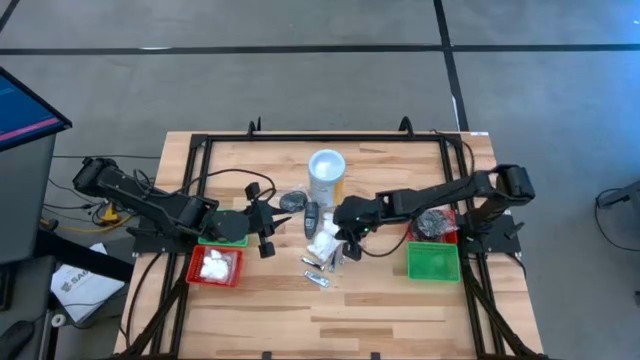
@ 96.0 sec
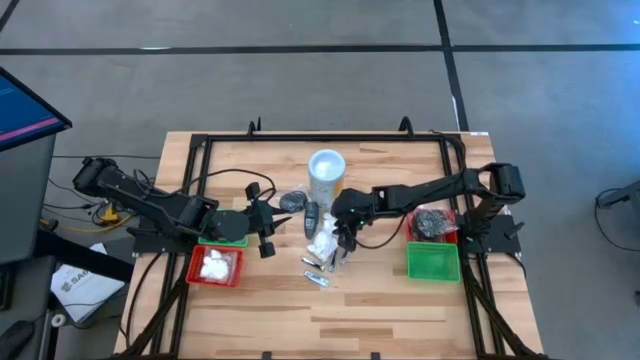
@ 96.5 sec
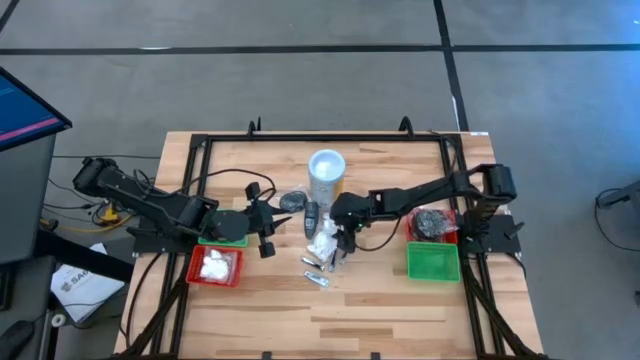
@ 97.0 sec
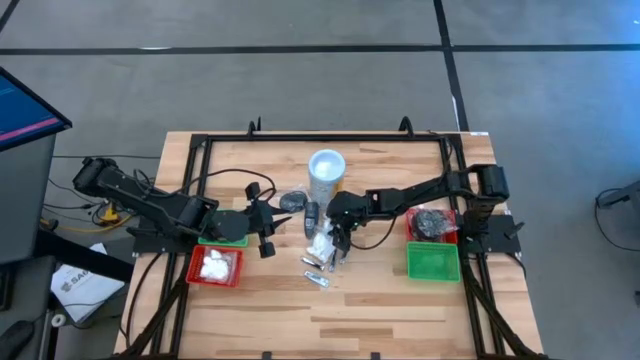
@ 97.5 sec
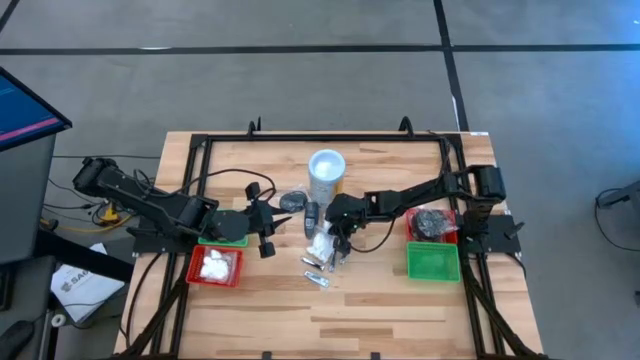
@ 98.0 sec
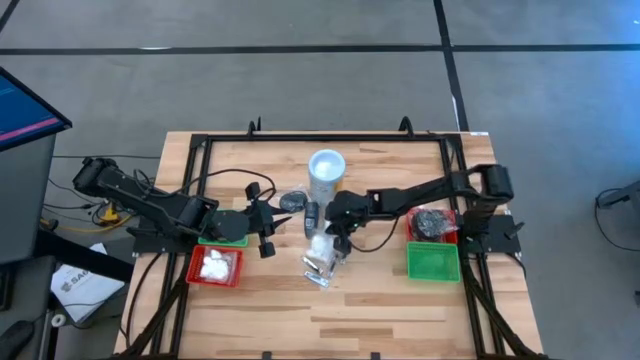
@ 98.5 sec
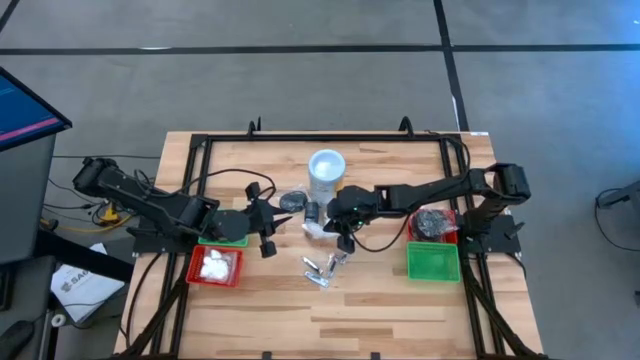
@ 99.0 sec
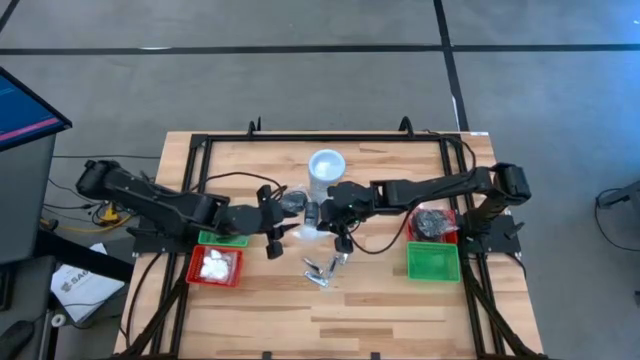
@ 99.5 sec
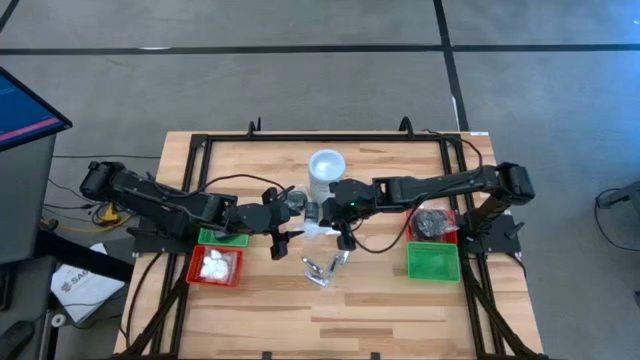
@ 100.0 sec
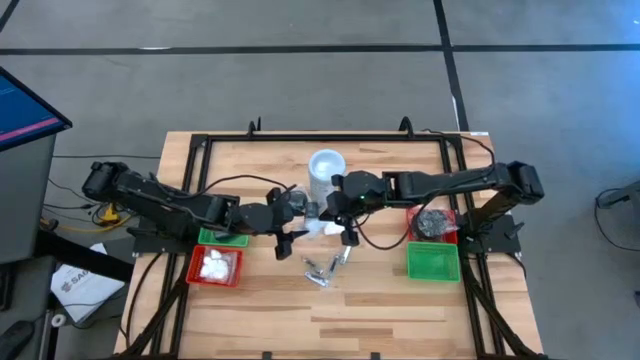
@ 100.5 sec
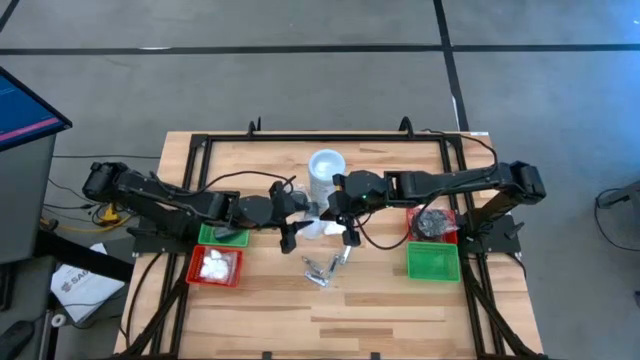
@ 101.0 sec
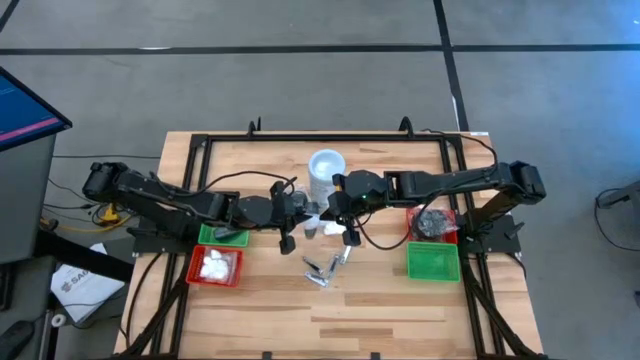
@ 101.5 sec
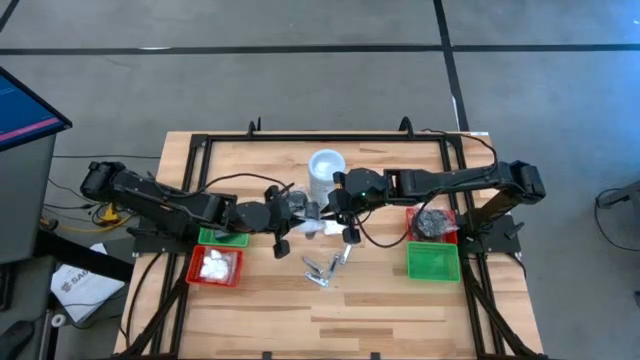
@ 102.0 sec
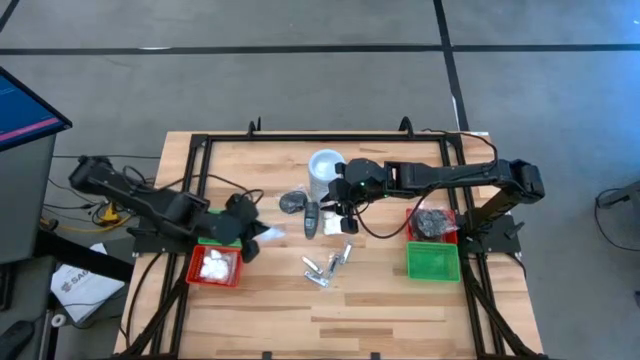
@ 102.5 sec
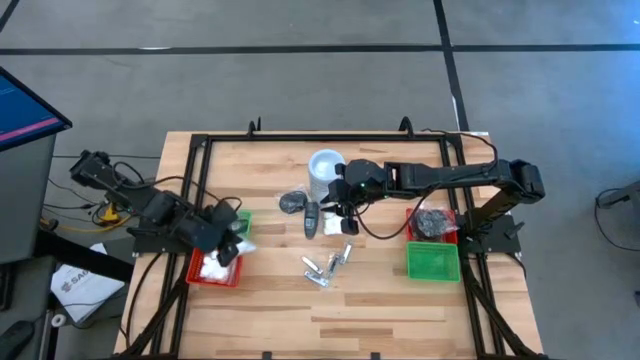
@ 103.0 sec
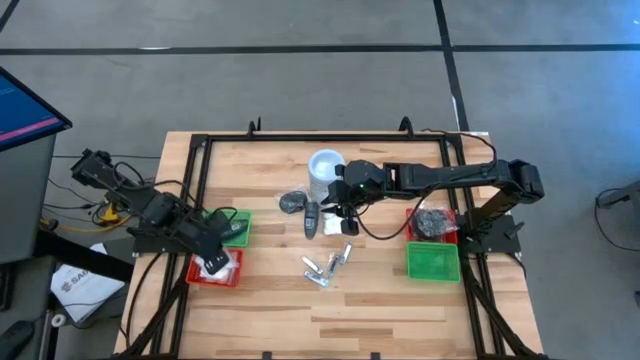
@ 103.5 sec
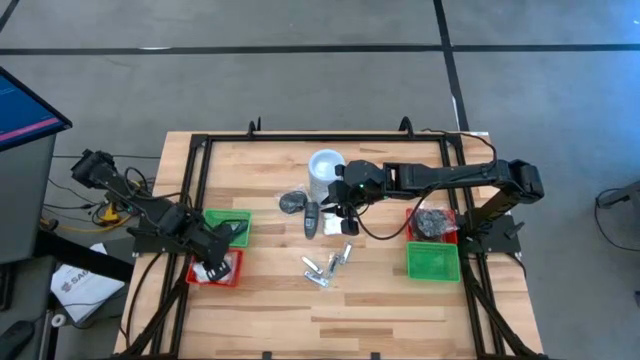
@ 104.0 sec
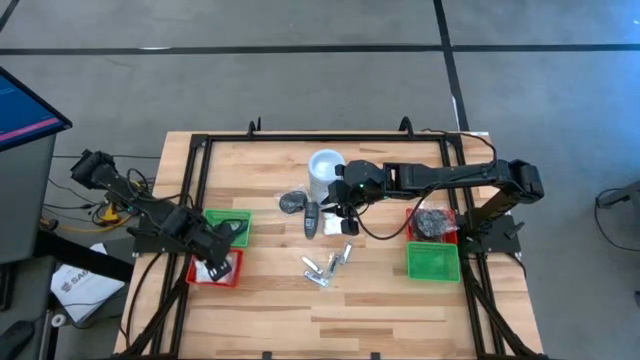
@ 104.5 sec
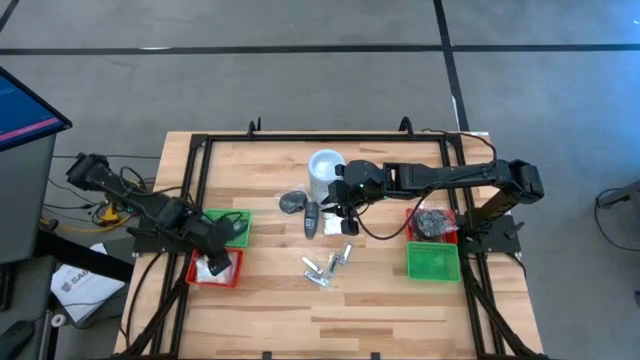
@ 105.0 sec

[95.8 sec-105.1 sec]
Task: Pick & Place Travel size toiletries
Put the cotton pack into the left red bin

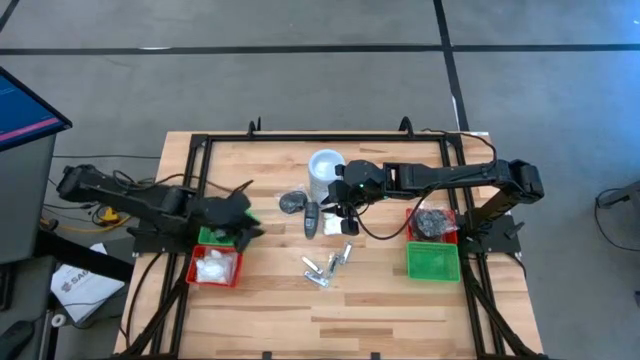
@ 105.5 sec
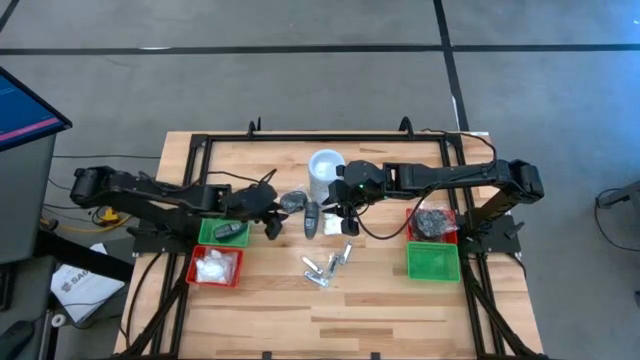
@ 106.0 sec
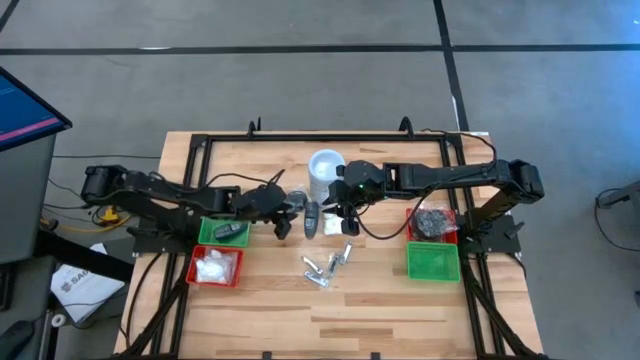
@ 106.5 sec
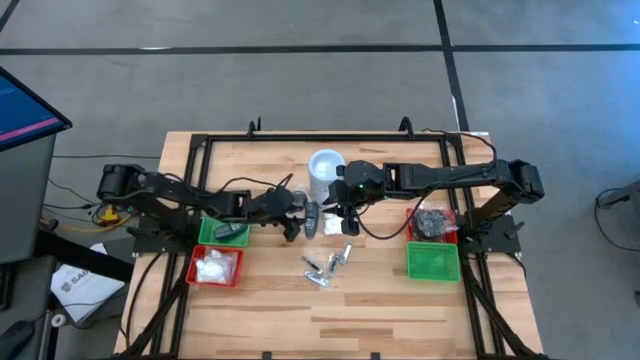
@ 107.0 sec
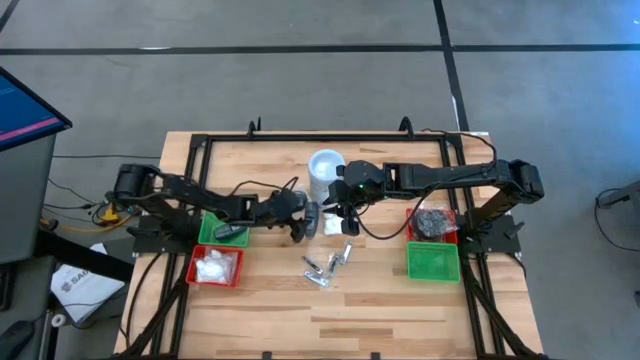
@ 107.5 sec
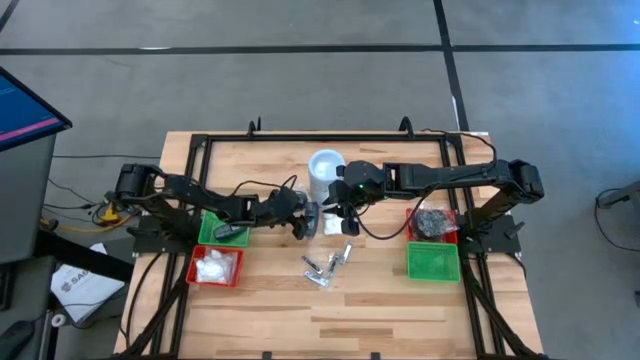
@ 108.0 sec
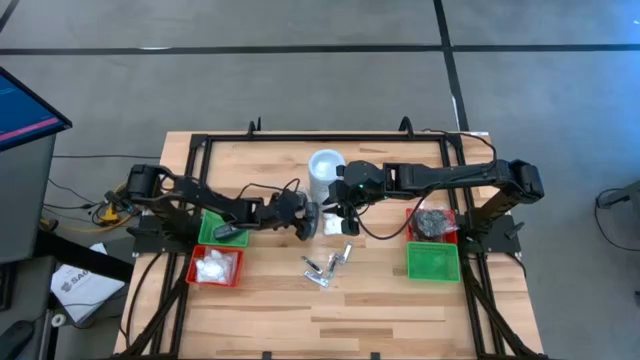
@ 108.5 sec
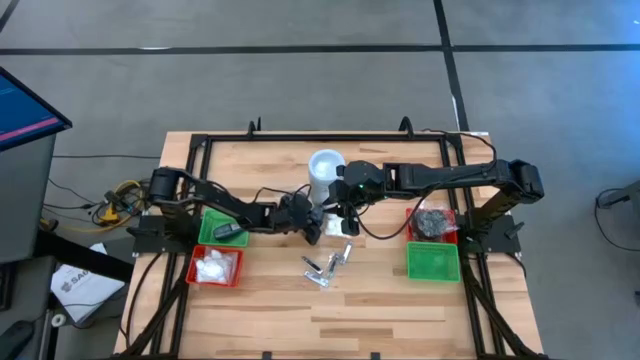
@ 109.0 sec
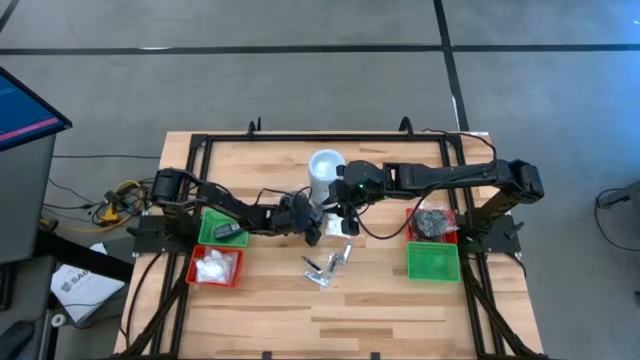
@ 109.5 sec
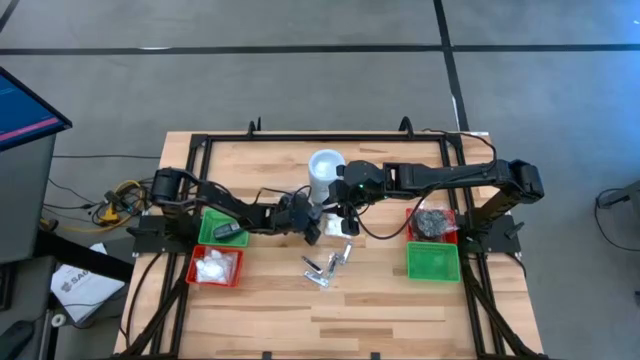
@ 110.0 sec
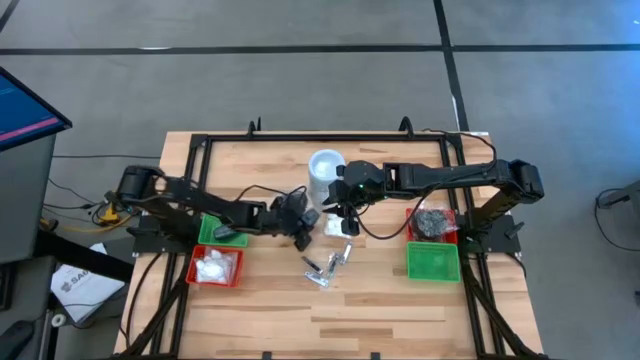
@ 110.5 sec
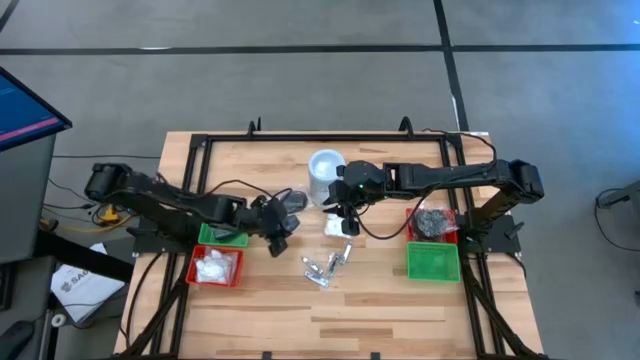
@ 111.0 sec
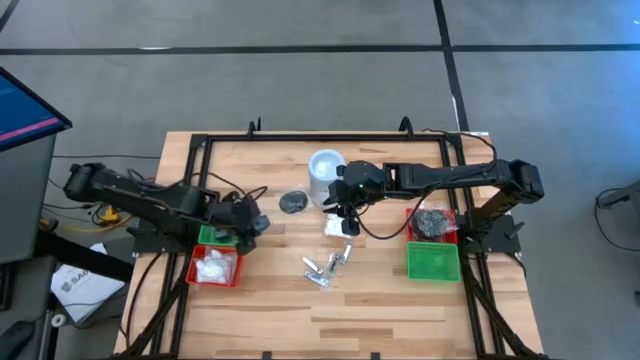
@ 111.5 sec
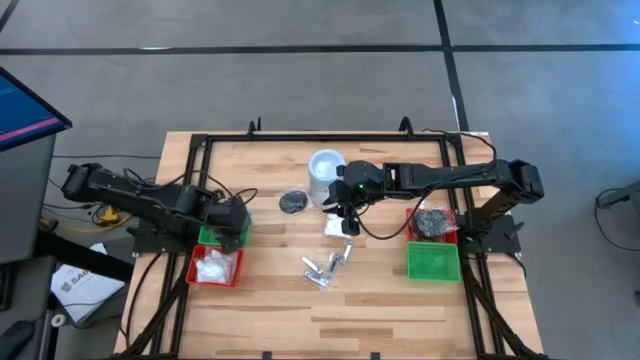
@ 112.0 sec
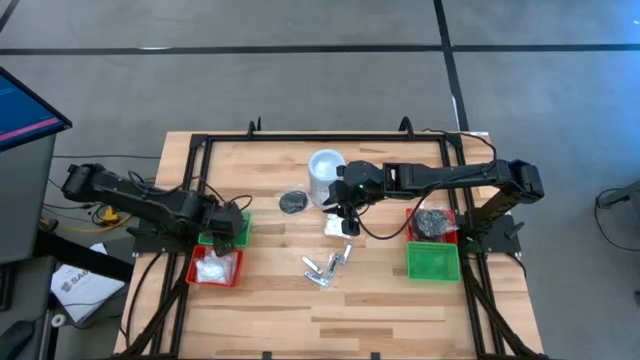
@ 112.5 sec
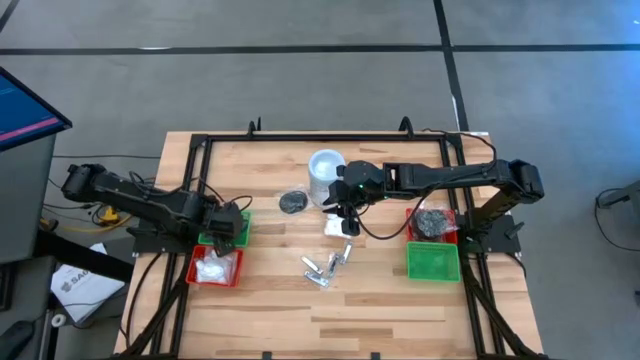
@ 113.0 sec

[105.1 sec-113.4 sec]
Put the gray deodorant into the left green bin

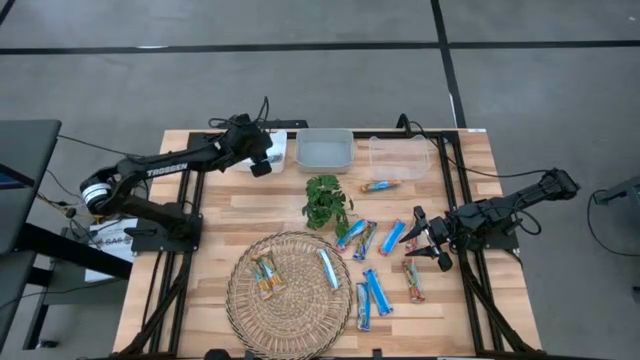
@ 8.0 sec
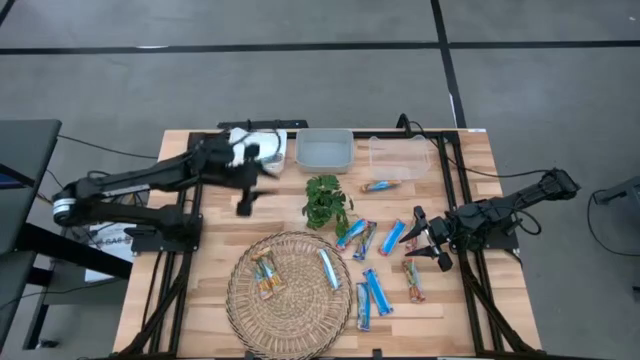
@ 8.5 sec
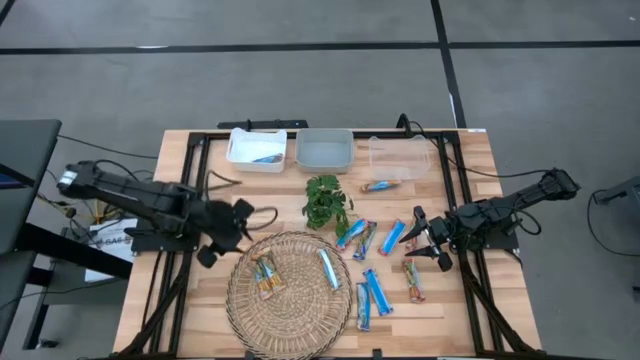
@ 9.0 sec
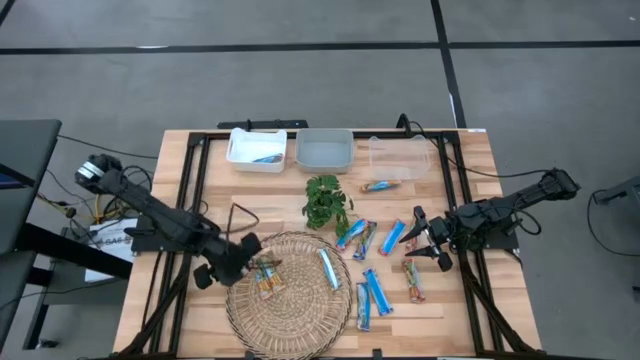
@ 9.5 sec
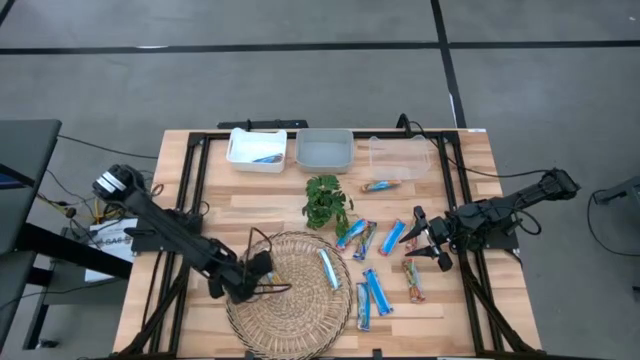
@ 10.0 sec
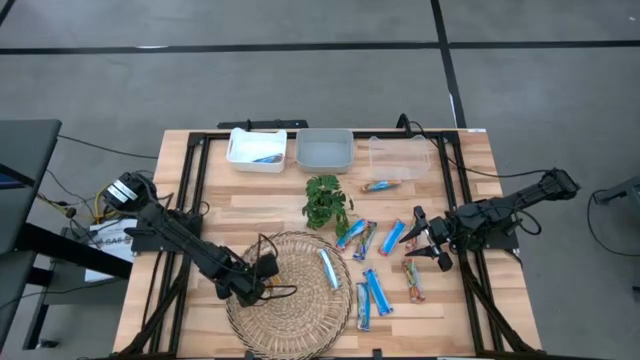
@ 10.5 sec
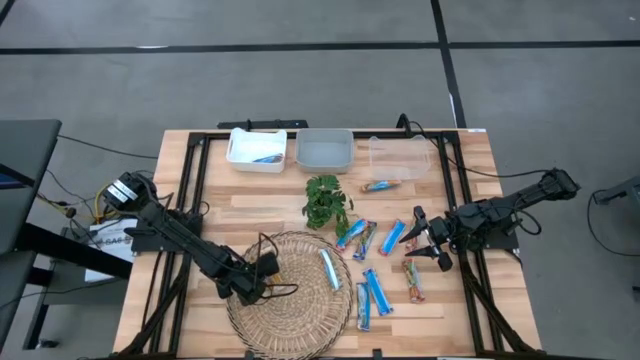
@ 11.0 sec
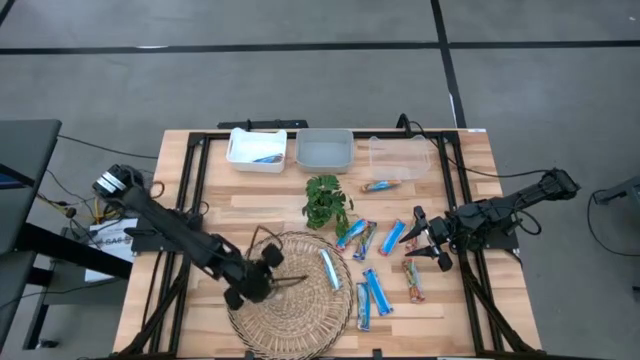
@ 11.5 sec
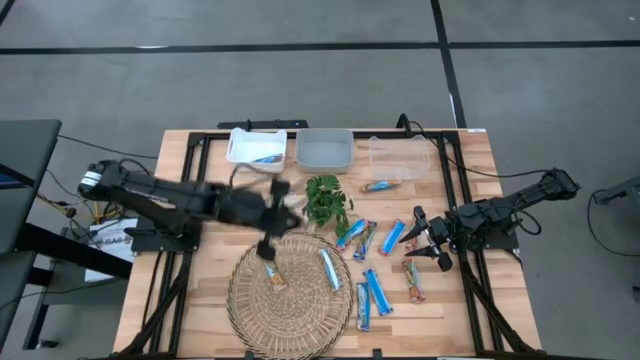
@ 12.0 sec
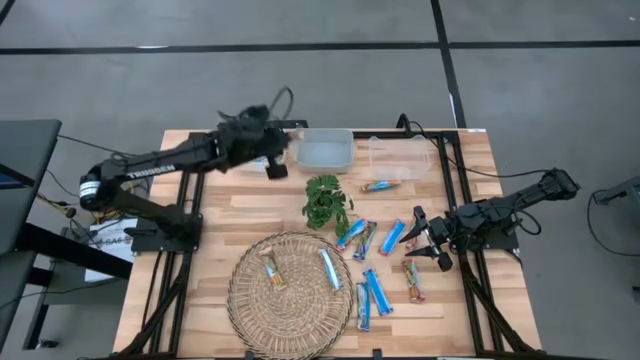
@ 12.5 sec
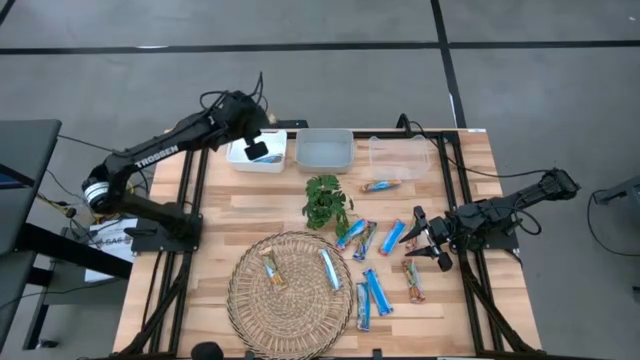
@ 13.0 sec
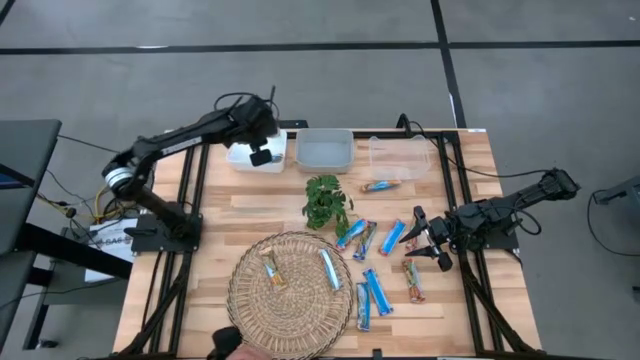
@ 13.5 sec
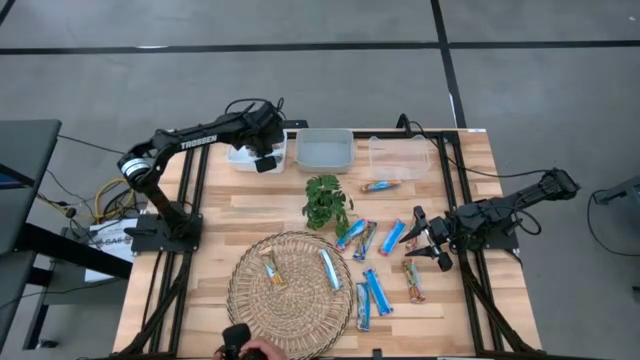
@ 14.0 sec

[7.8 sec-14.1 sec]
Task: Pick and place Granola Bars by type
Put the yellow granola bar into the white bin
